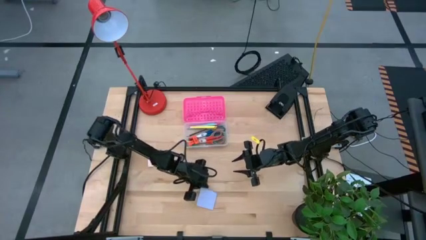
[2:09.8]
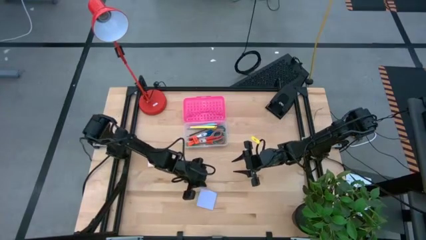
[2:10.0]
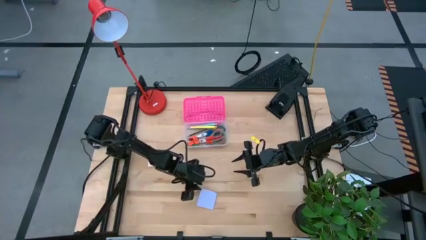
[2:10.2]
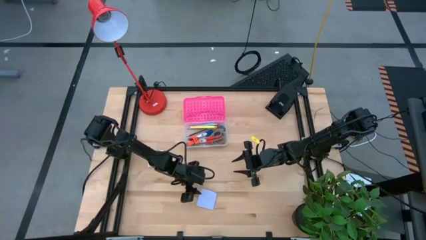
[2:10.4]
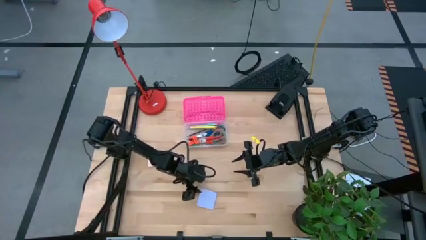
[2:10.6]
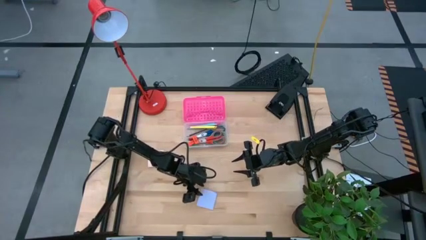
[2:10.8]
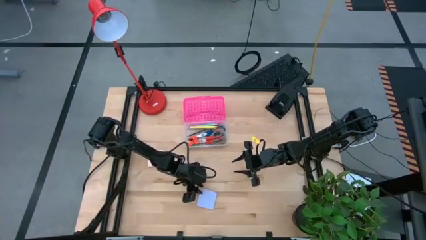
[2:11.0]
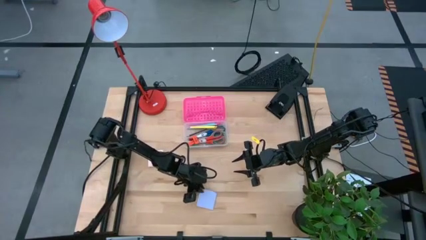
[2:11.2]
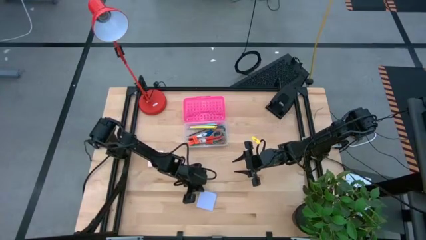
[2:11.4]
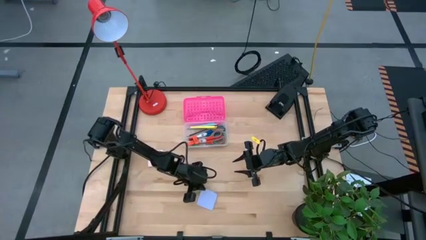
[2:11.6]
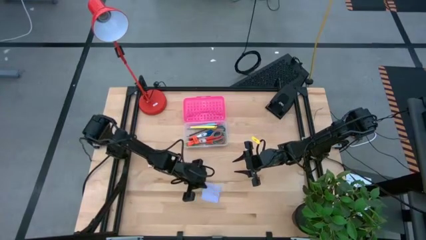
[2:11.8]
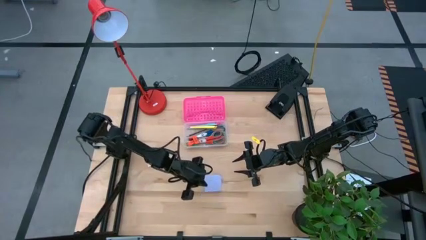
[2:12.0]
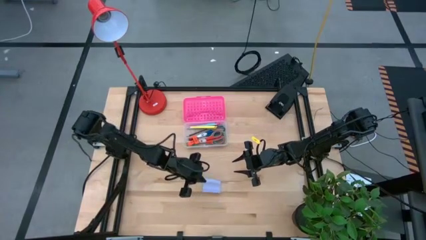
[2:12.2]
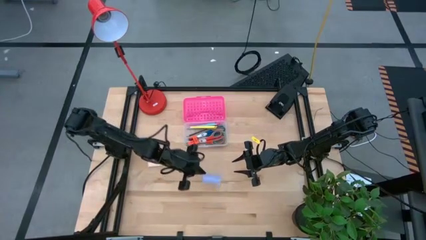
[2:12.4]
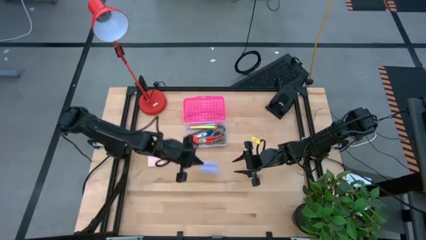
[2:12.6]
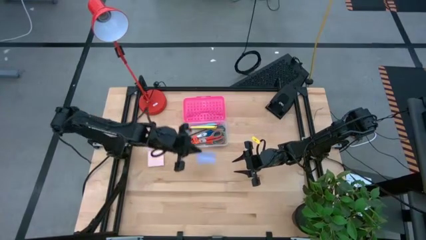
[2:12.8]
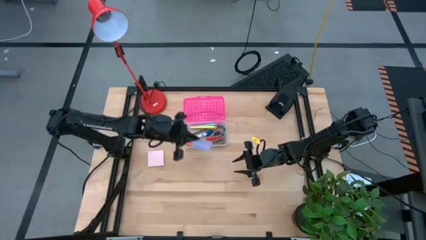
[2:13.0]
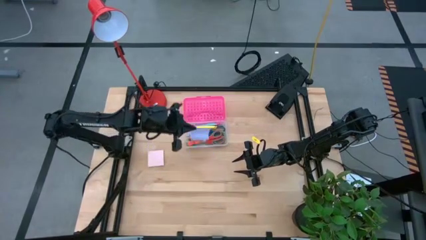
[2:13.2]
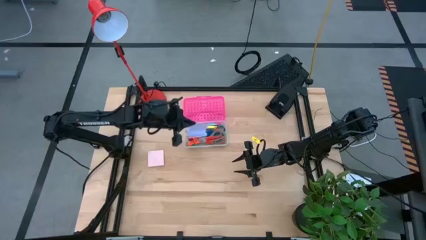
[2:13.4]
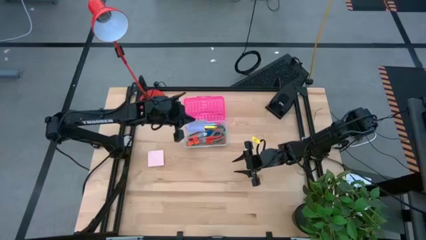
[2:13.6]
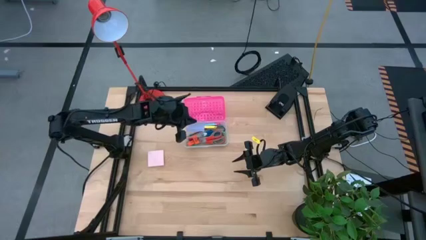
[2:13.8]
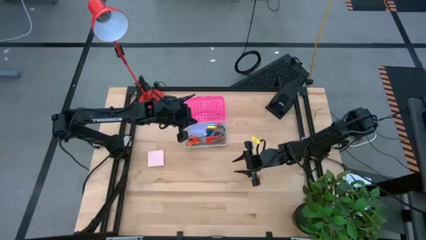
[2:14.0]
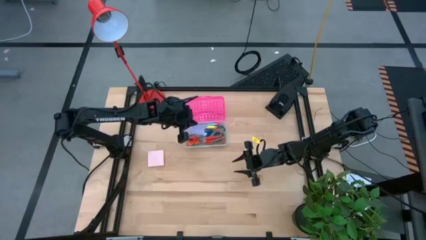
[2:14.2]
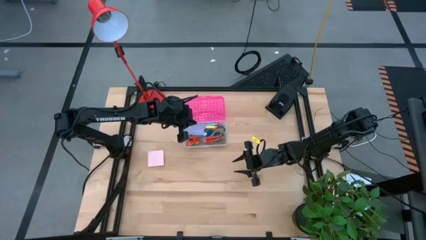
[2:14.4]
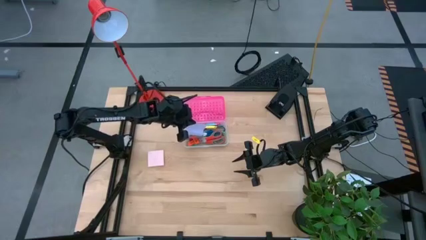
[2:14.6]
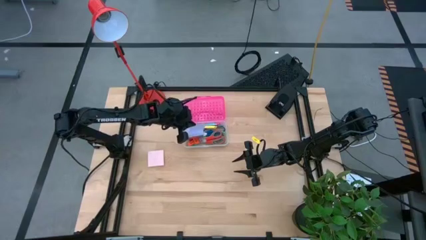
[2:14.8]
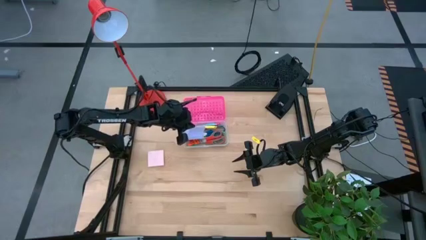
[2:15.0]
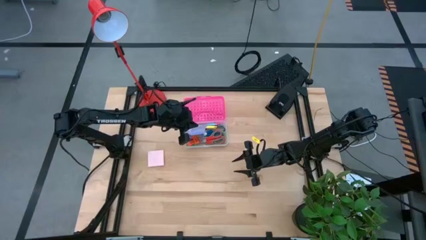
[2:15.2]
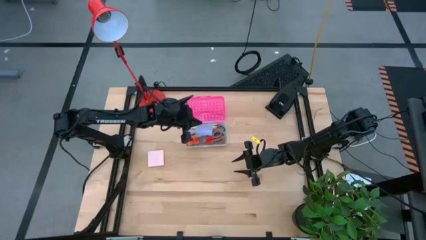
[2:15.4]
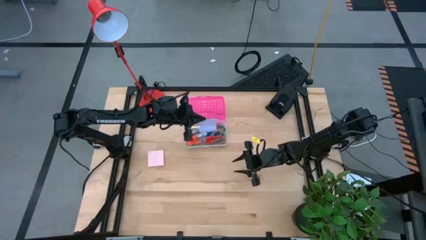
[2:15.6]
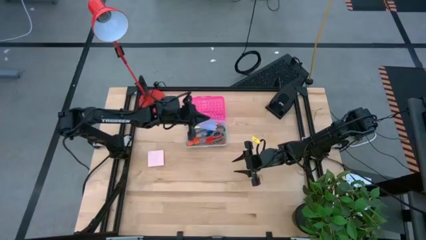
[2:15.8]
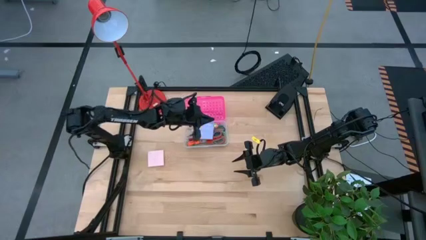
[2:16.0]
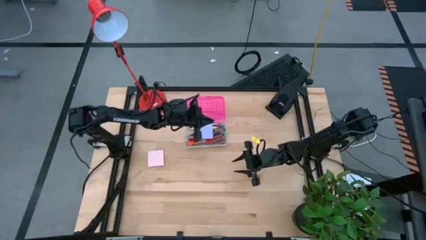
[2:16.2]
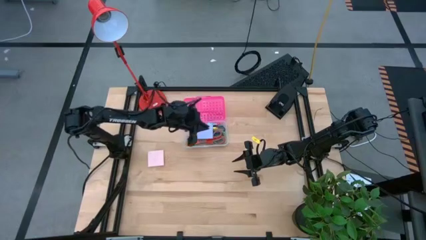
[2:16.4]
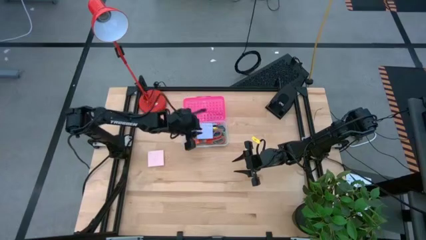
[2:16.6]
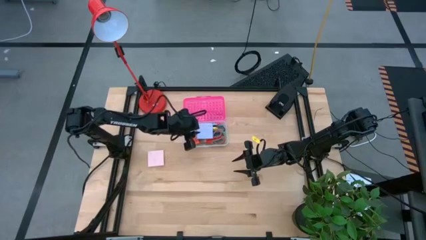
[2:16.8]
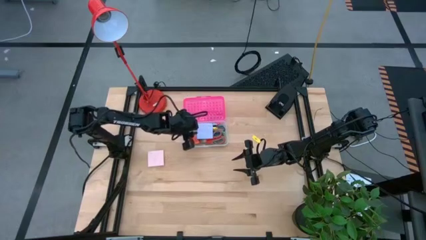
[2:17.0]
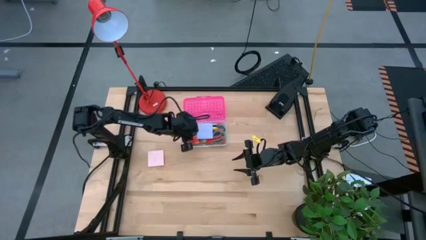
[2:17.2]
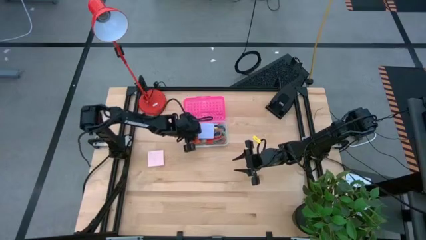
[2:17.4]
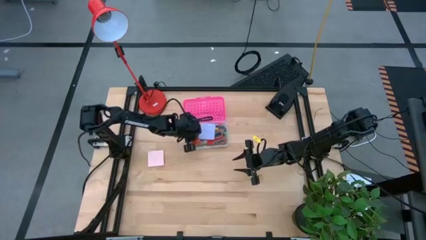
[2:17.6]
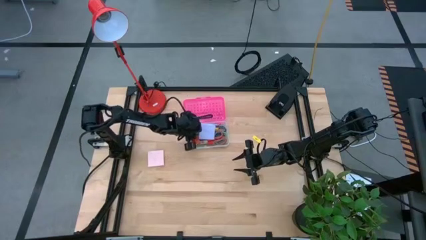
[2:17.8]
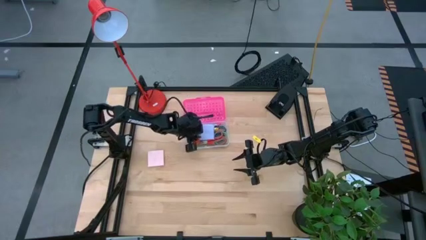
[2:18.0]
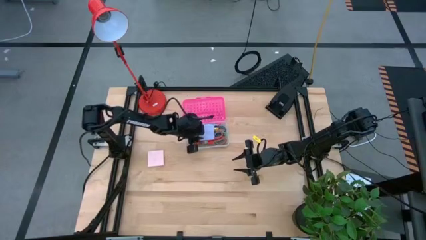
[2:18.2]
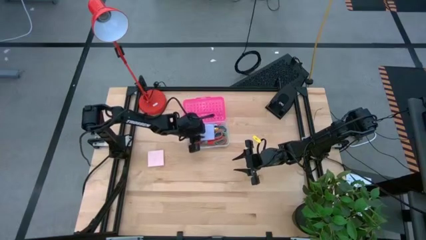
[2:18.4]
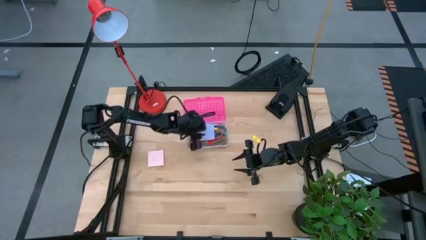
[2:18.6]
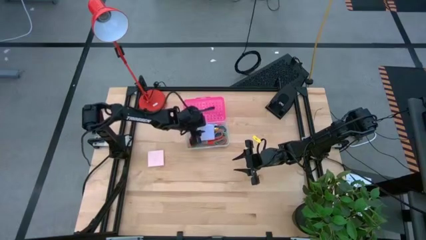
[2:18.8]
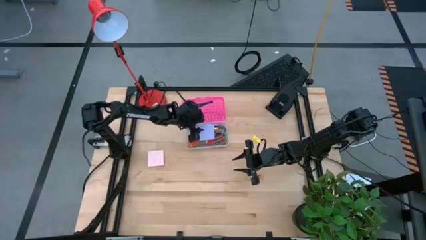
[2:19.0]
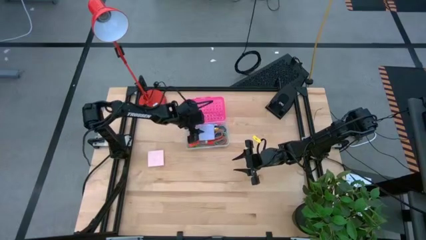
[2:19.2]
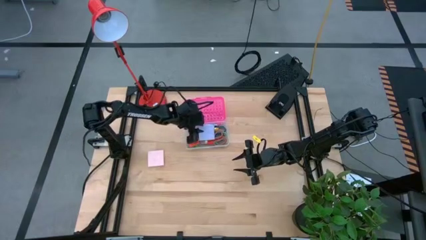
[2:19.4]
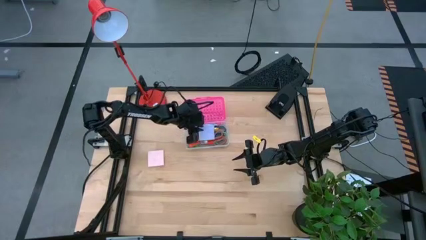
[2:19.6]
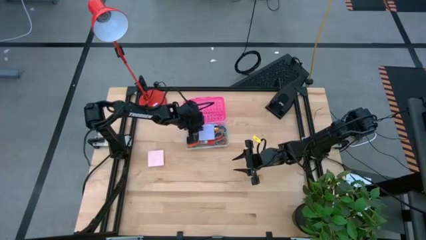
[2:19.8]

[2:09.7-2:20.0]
Task: Pack school essentials
Put the purple sticky note into the pink supply box
